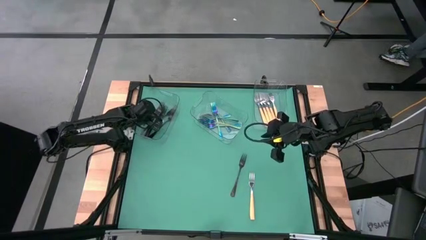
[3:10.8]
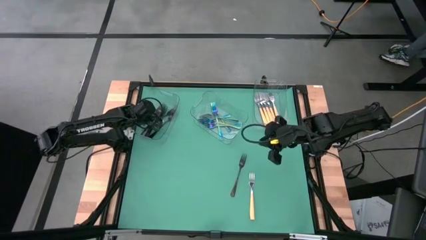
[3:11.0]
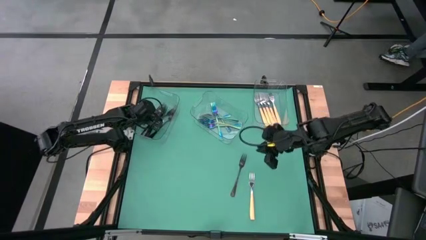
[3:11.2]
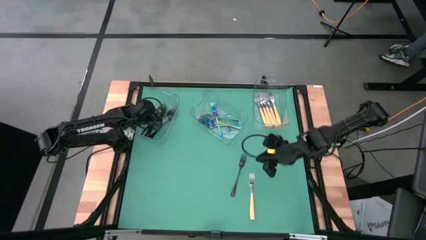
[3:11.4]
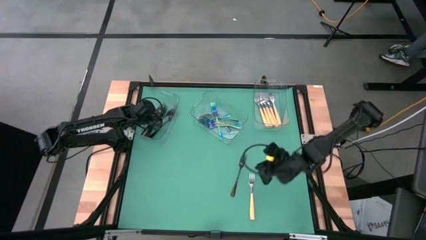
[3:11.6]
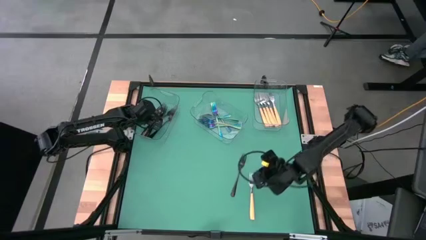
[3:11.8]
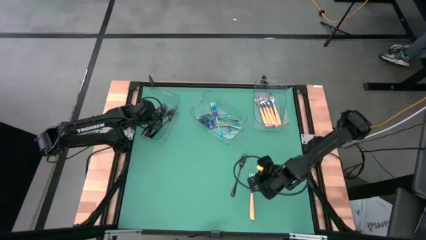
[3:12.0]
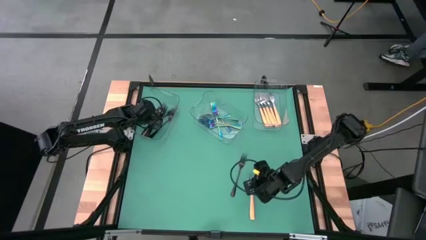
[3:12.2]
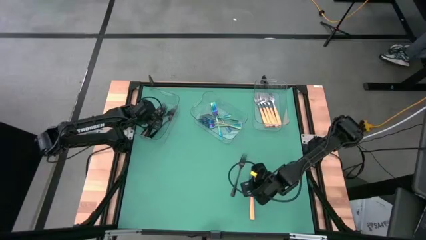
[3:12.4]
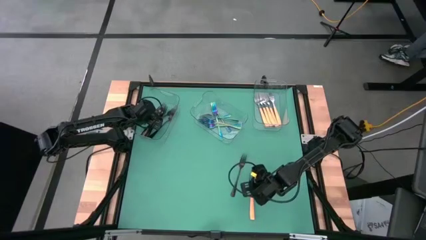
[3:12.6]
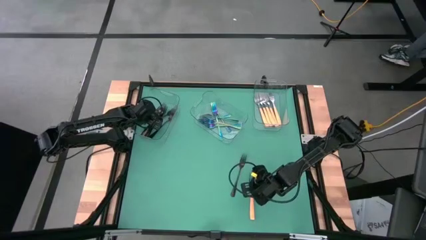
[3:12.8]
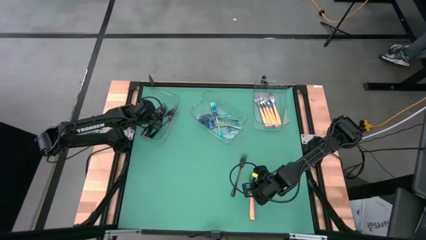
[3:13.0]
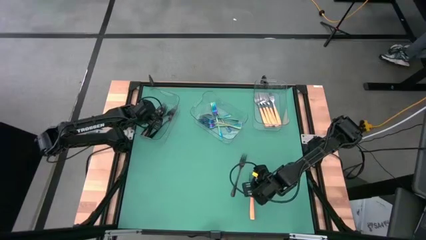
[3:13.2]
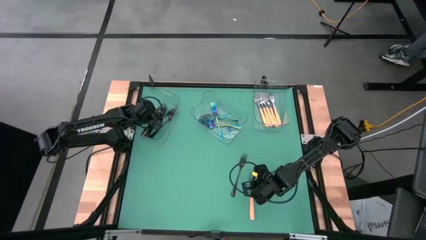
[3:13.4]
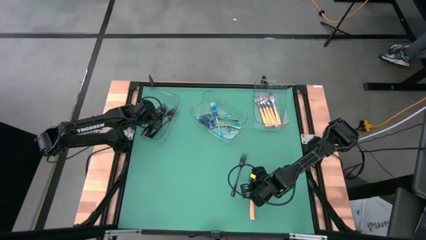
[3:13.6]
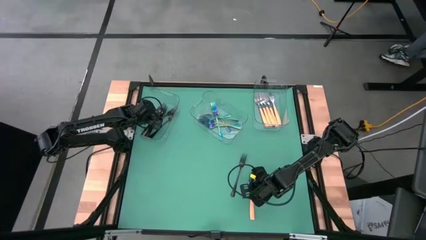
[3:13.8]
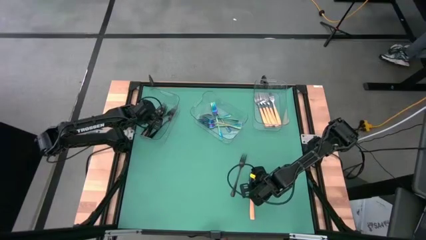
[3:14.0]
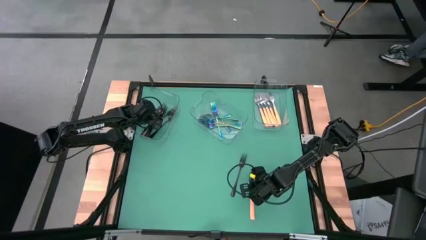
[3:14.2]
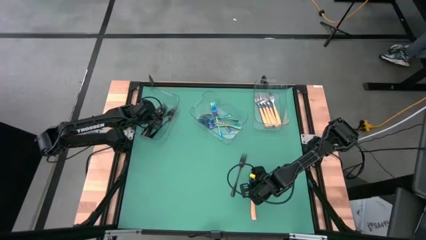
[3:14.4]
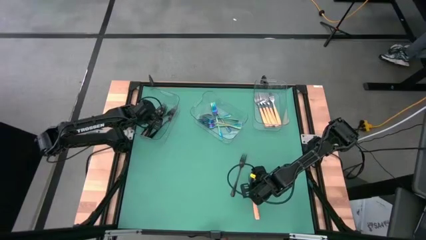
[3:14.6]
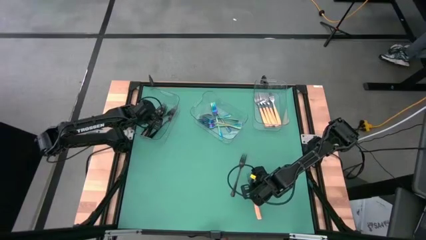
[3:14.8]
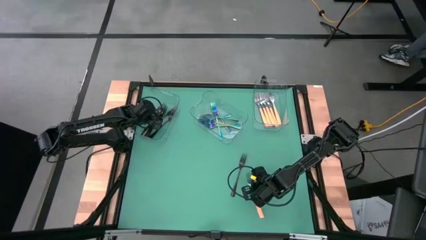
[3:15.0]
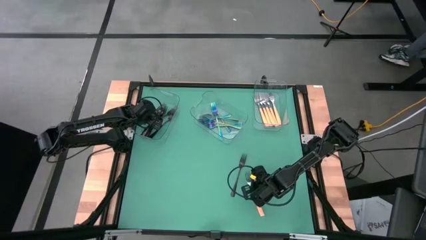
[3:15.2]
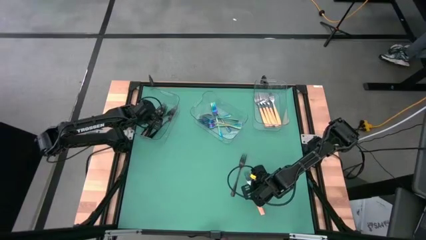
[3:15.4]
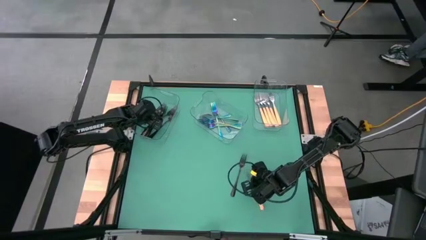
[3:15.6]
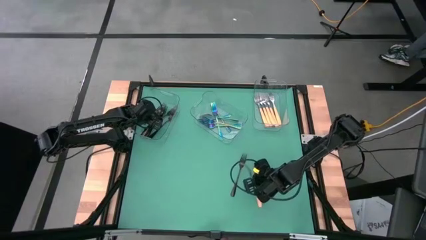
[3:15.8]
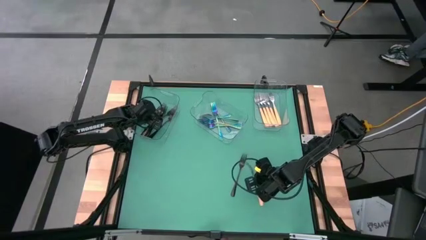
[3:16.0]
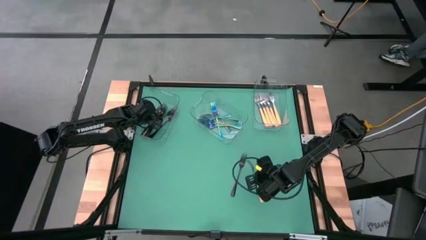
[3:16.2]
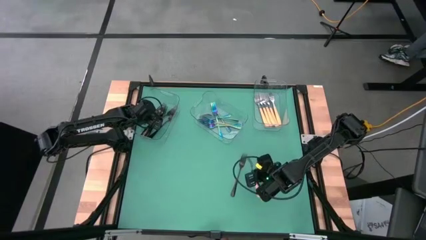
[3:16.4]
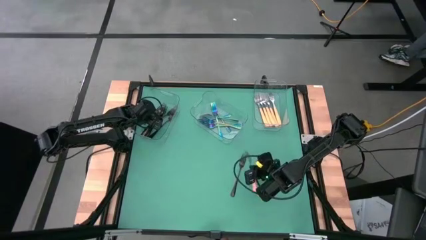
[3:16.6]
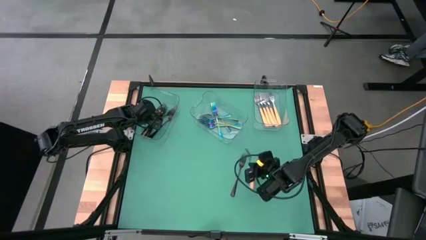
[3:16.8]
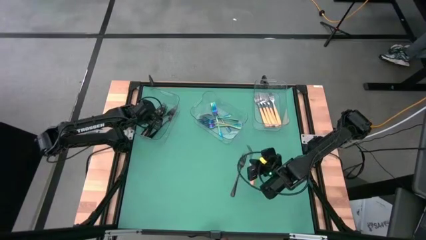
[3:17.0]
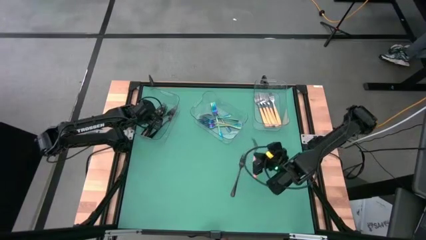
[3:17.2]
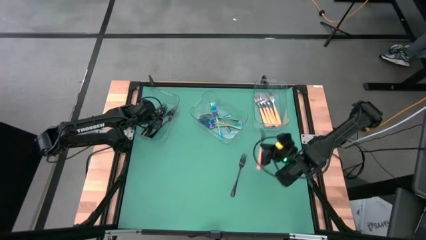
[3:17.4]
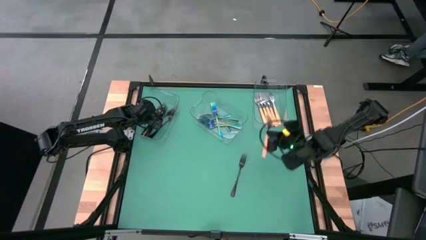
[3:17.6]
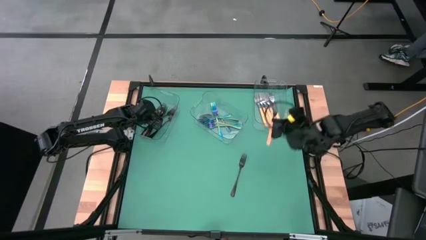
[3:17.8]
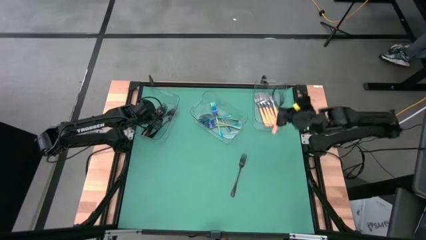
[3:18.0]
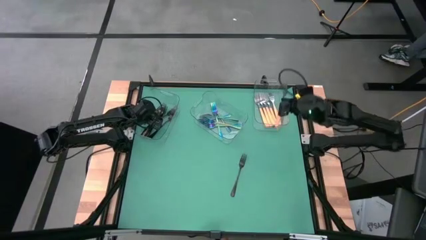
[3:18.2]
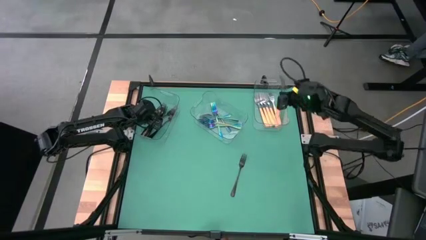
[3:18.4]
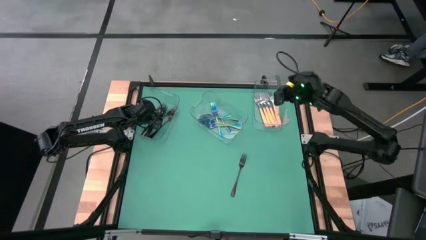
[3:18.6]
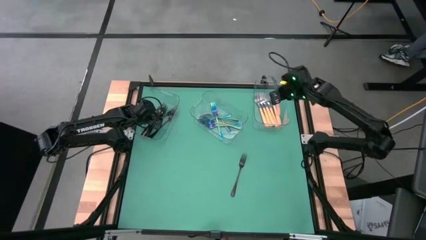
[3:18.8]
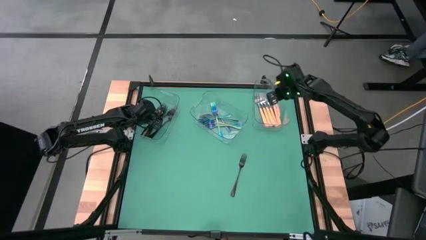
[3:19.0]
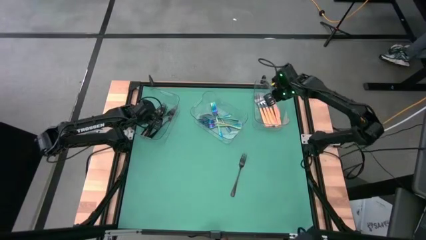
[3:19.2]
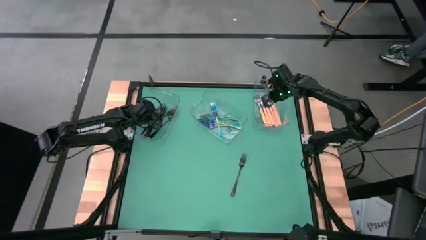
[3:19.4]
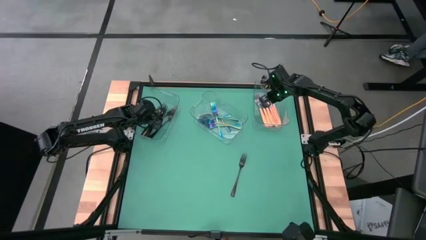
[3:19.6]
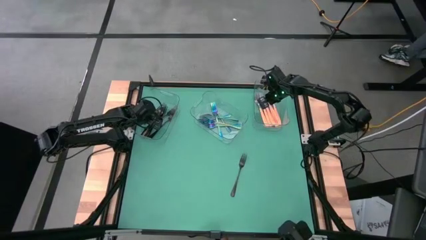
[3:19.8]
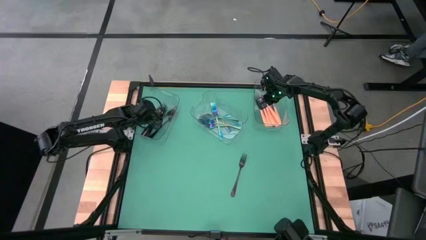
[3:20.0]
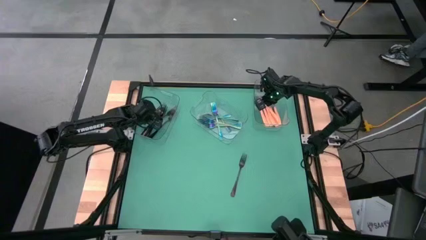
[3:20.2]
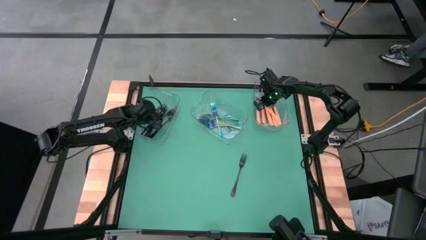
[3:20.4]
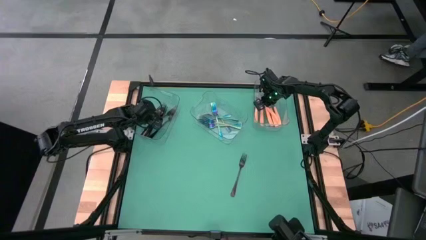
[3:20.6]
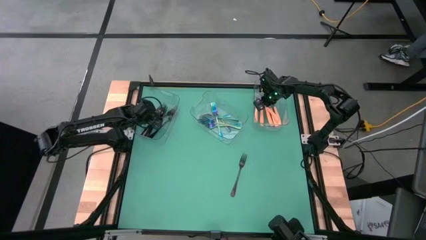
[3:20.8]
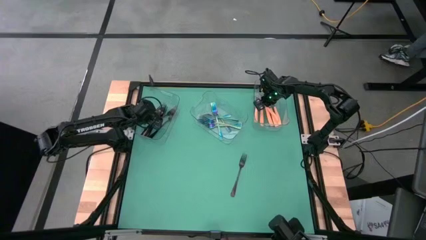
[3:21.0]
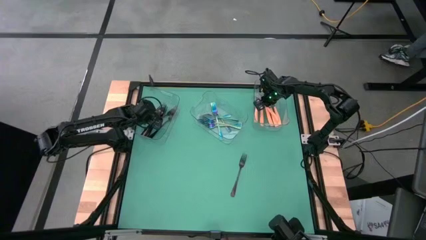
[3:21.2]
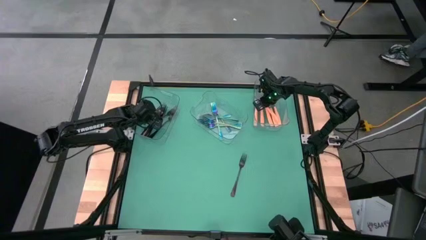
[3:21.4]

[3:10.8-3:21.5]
Task: Sort silverware by color (type)
Put the orange fork into the right transparent bin

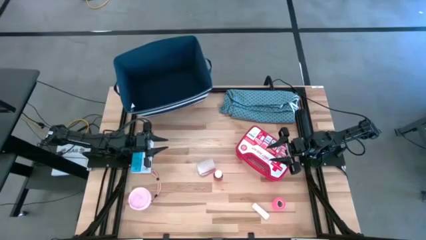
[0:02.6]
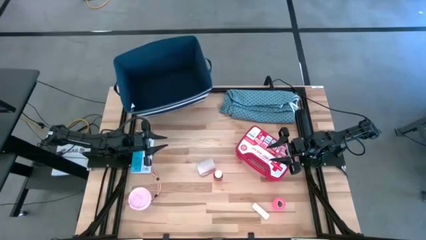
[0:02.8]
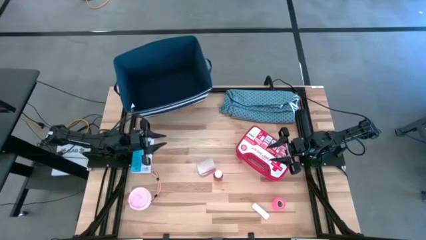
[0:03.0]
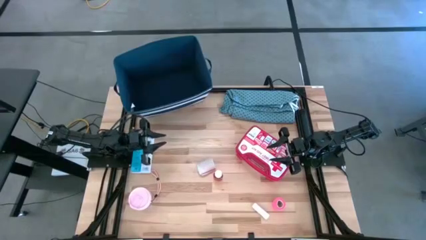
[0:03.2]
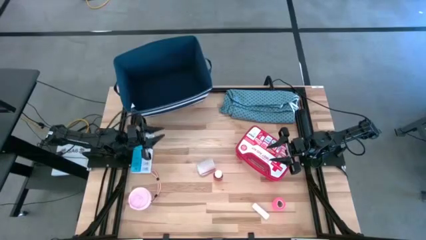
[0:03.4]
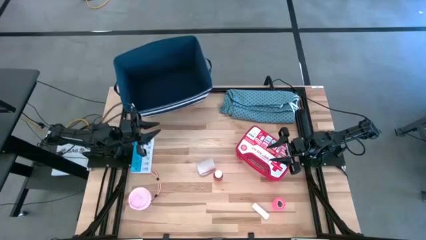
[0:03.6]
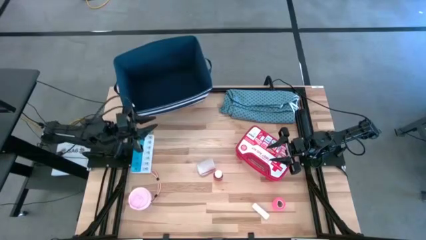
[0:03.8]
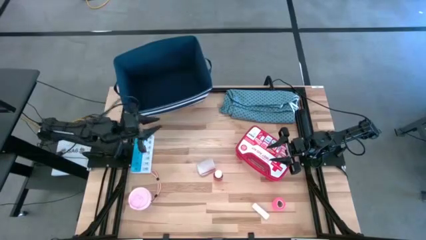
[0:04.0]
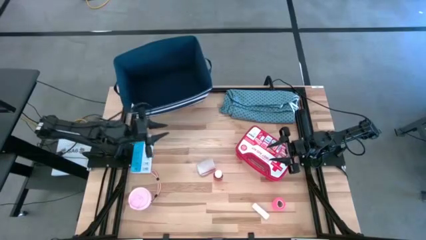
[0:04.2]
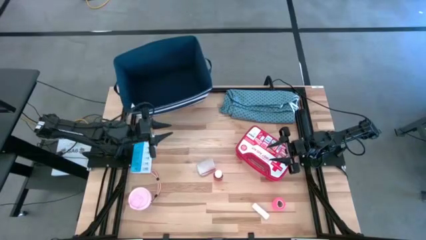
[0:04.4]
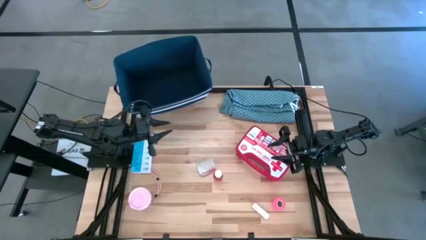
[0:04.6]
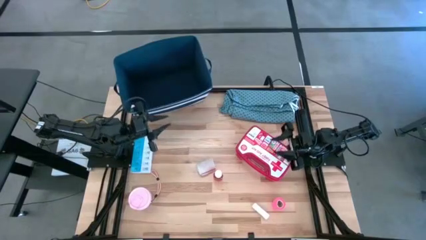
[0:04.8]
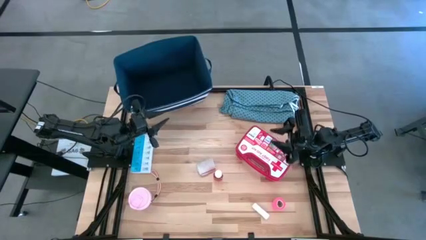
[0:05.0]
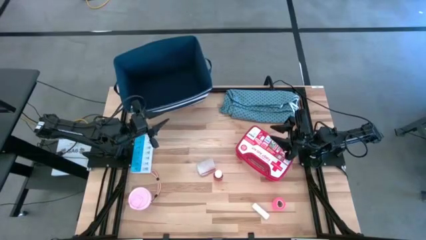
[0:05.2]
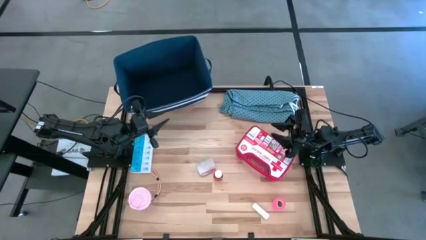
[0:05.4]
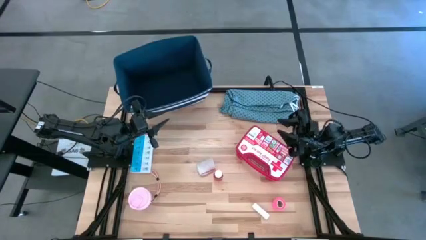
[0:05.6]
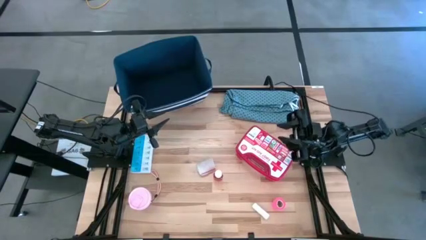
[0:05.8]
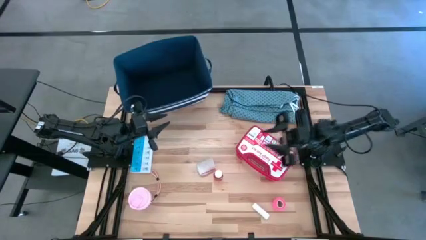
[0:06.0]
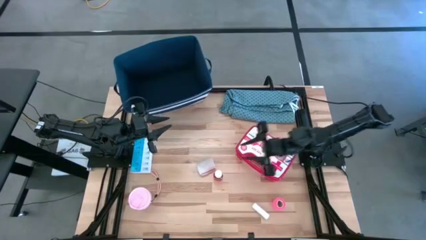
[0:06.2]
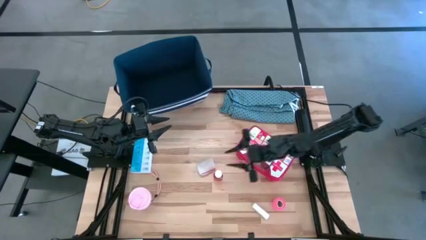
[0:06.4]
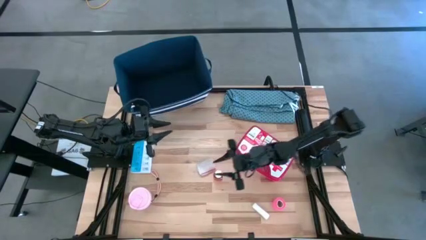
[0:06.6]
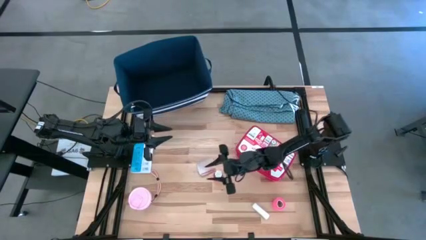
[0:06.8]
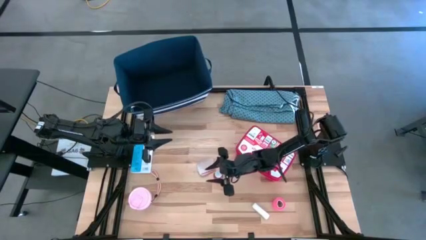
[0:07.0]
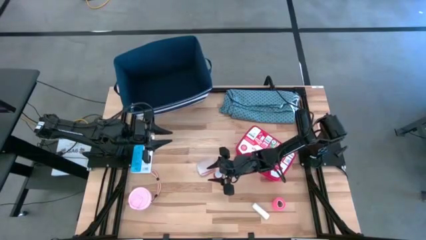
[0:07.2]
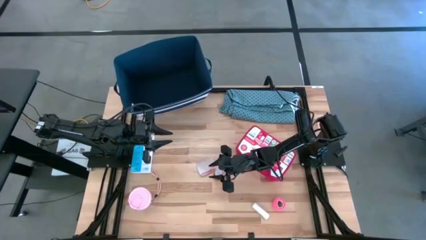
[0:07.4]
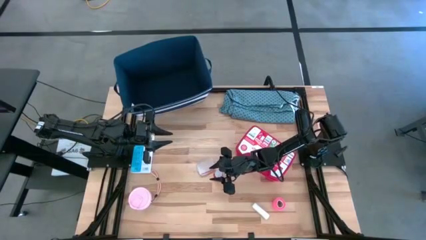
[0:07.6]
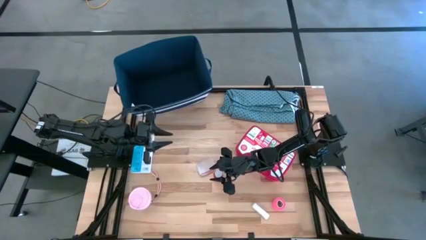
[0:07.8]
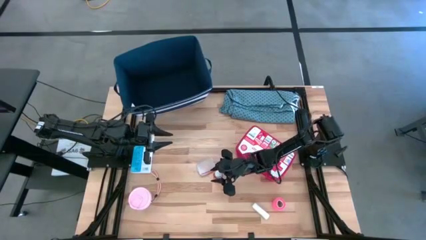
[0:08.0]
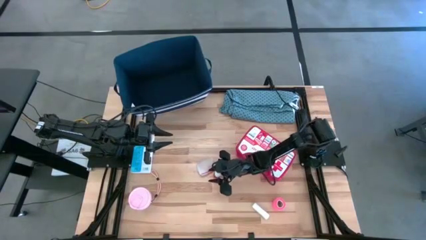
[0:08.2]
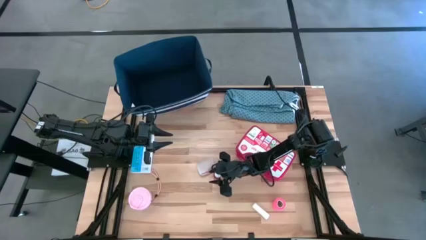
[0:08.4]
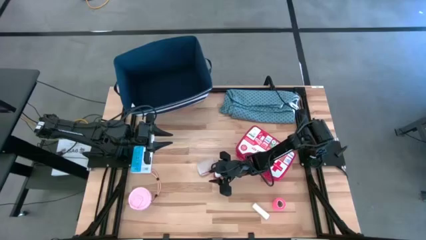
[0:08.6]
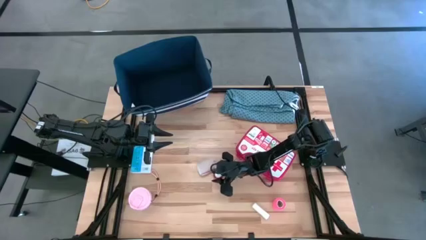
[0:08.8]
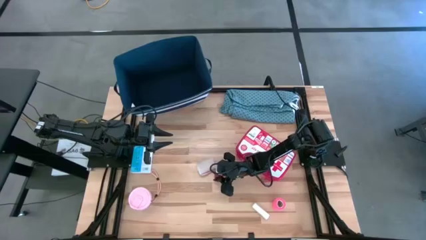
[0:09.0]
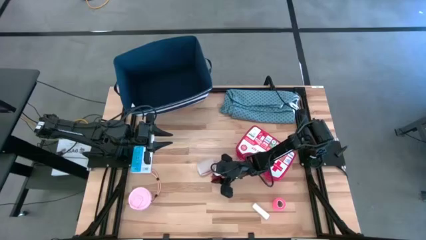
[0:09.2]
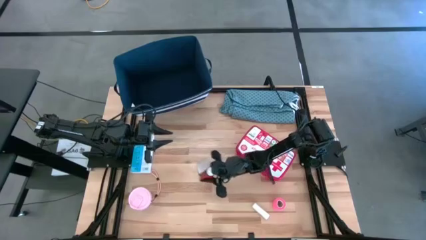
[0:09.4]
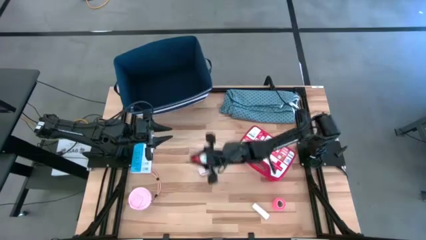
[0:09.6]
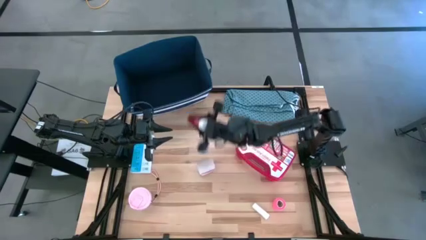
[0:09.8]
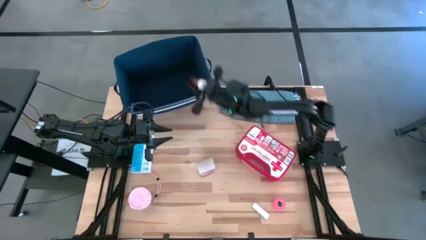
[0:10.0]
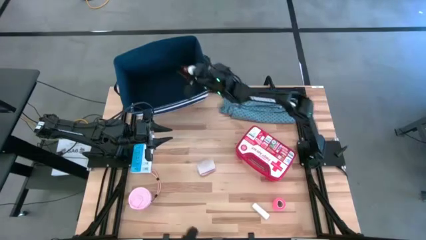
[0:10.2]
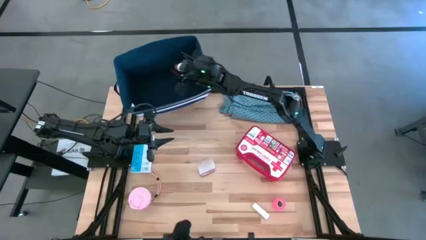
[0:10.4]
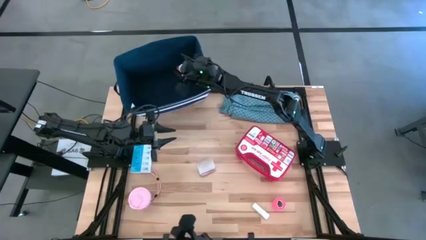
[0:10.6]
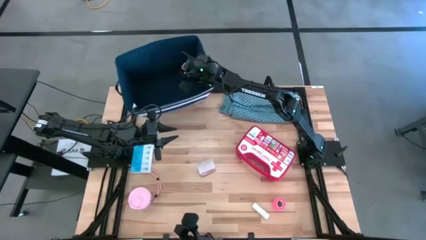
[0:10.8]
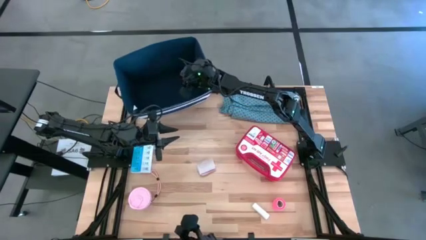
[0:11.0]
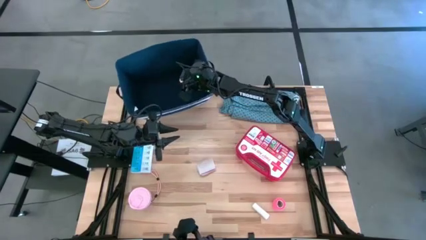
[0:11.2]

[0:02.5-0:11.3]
Task: Pick & place medical supplies in basket/bin
Put the red pill bottle into the blue bin
